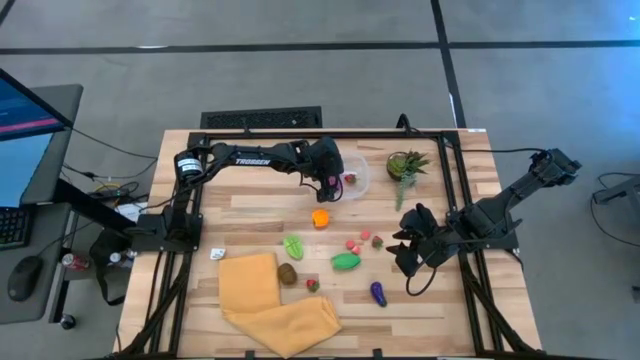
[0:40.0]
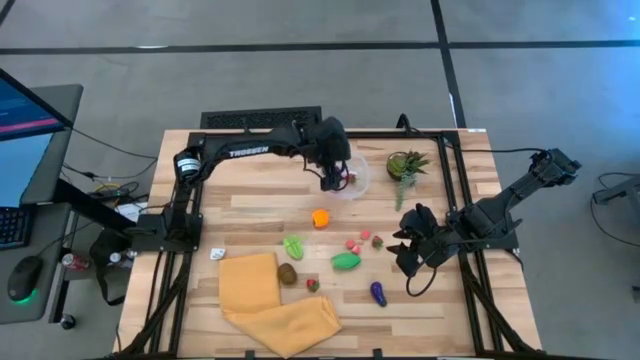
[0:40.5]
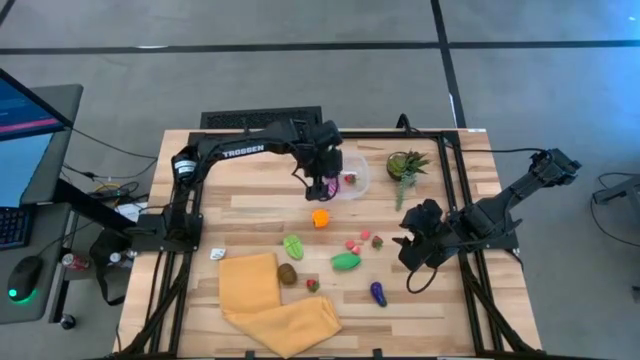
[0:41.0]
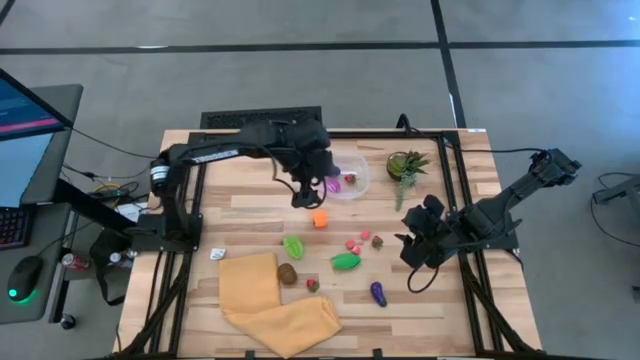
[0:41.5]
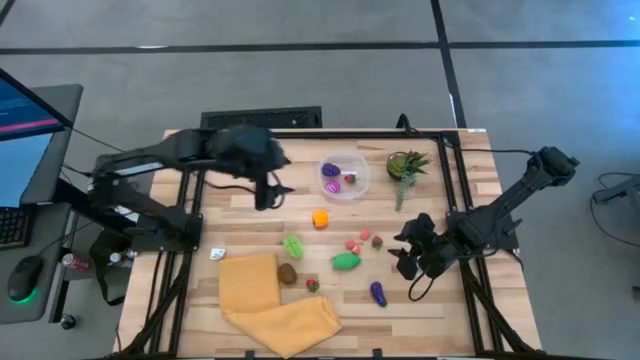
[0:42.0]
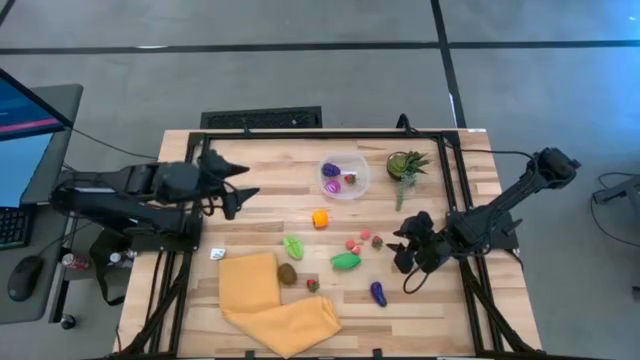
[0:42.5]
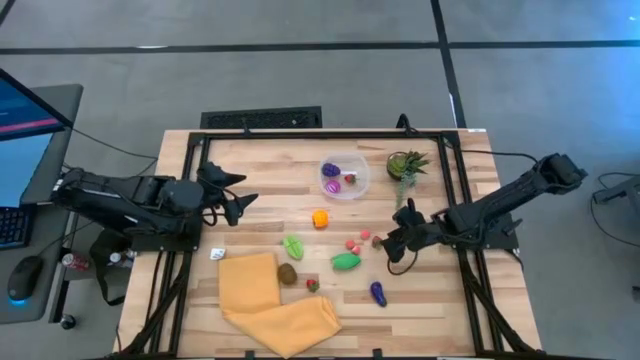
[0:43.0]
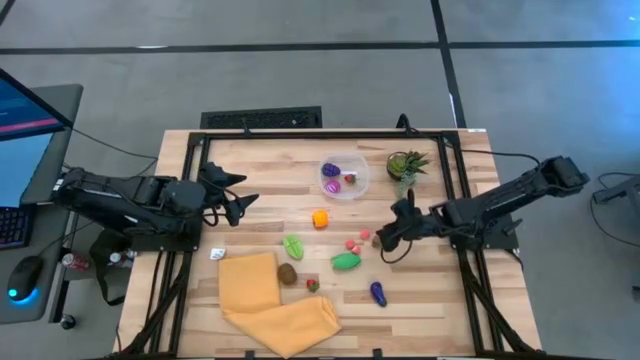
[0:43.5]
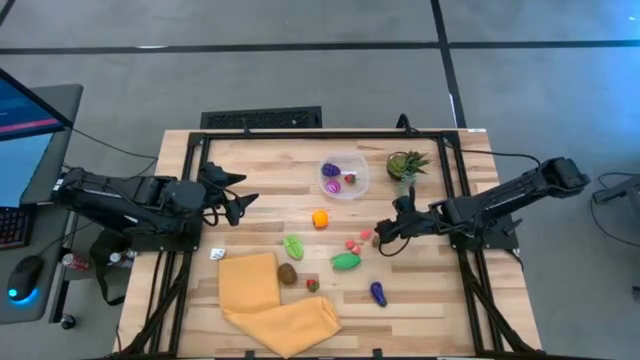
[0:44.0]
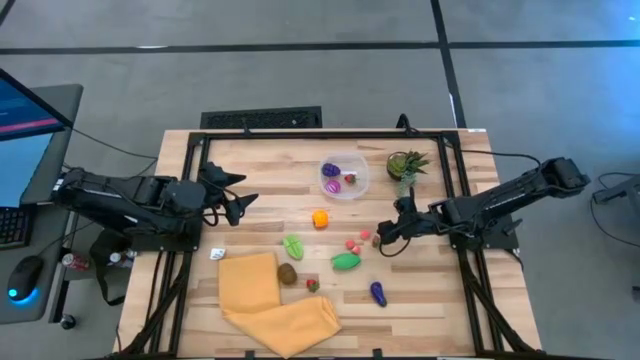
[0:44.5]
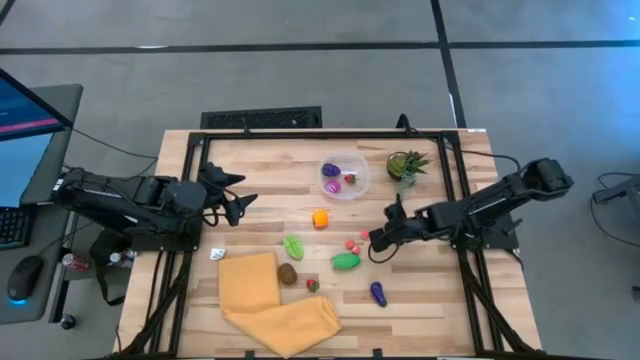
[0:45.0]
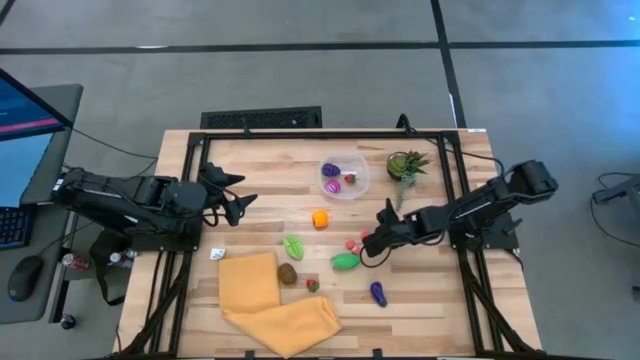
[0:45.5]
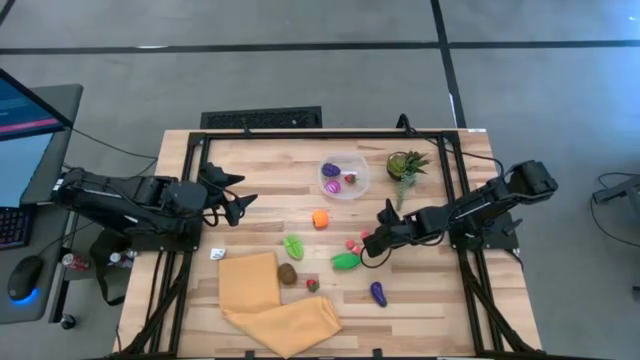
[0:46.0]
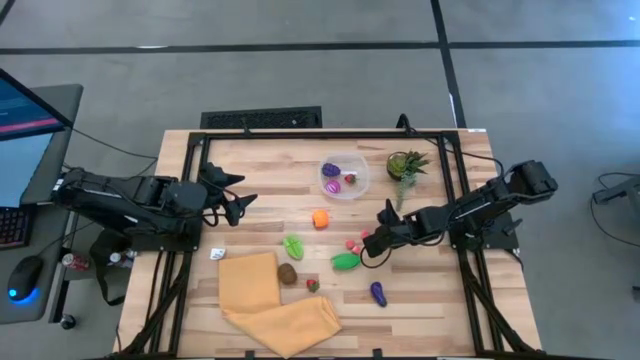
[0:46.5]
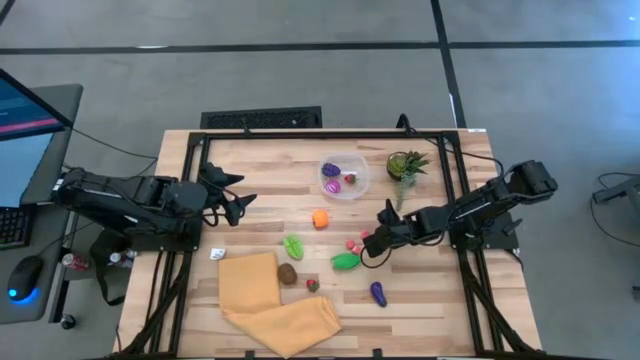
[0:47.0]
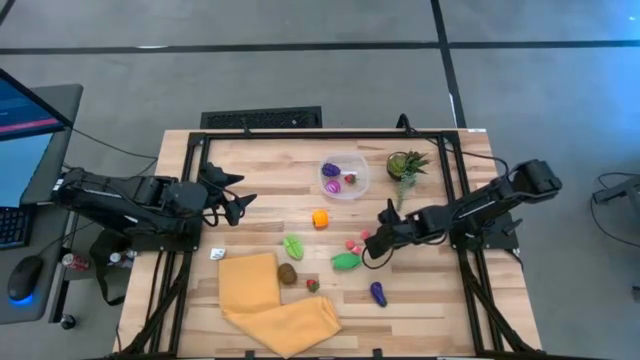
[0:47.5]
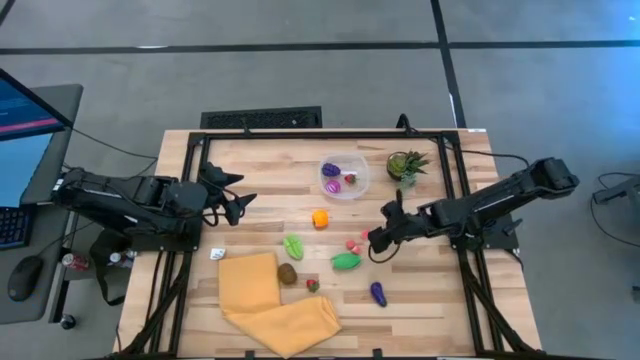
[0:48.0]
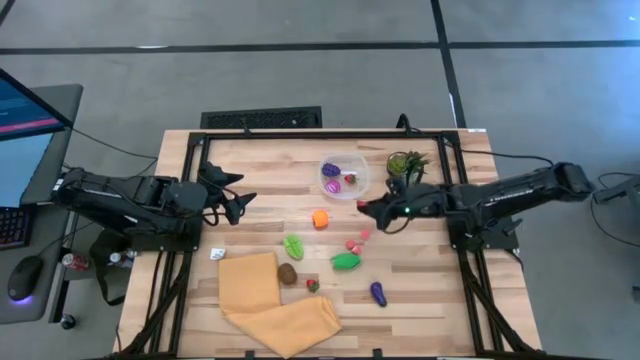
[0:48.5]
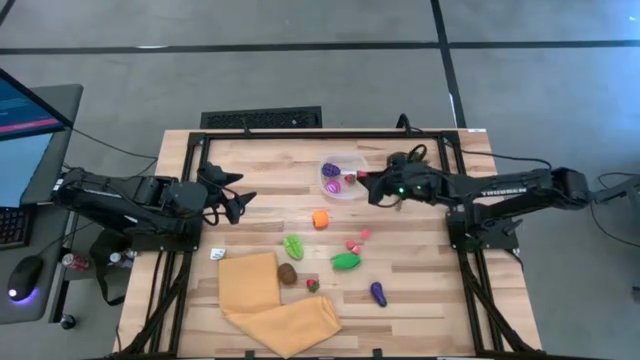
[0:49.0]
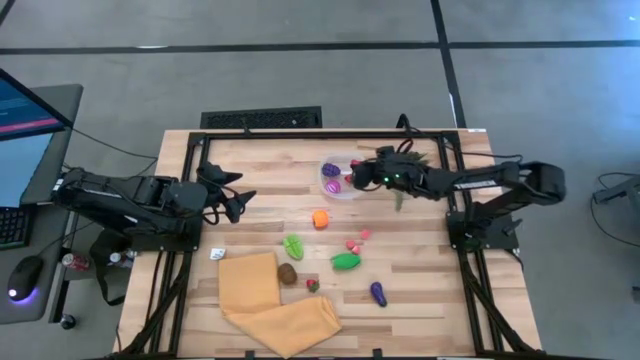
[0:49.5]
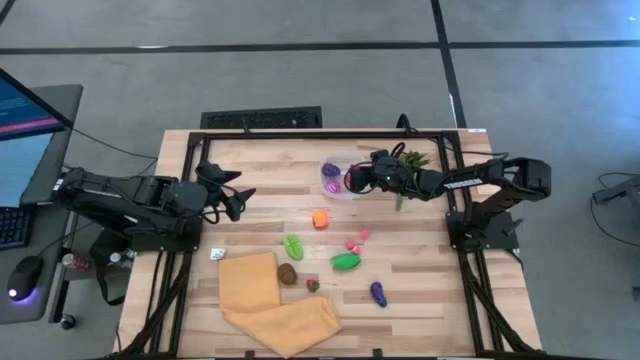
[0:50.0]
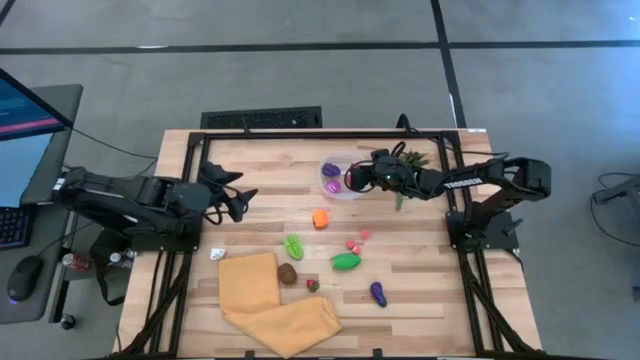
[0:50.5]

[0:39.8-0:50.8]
Task: Pick and placing Produce into tupperware
Put the top strawberry in the transparent bin

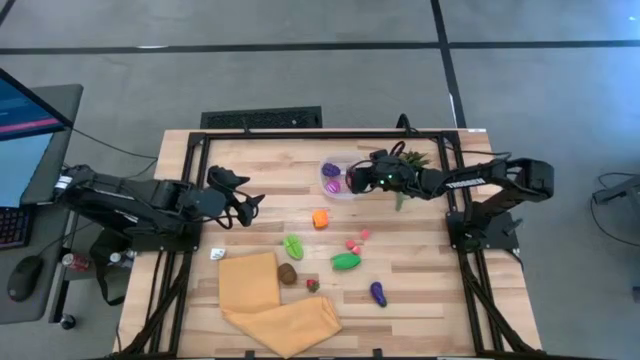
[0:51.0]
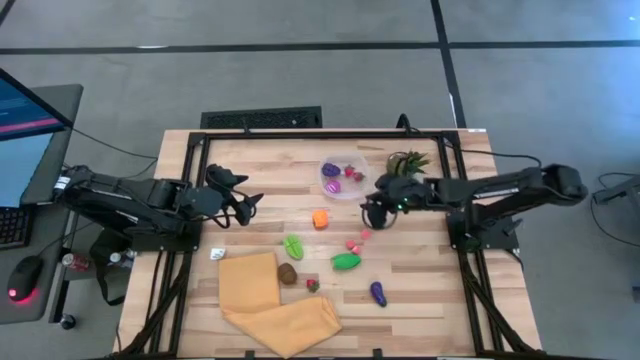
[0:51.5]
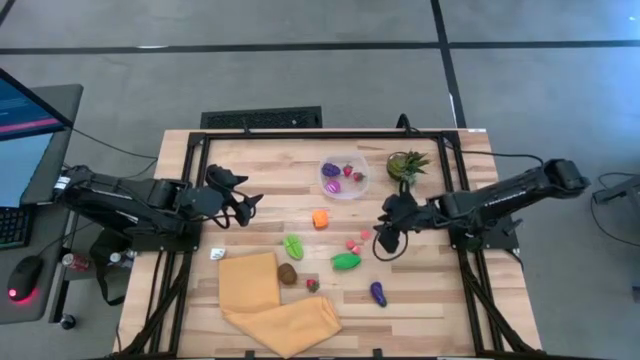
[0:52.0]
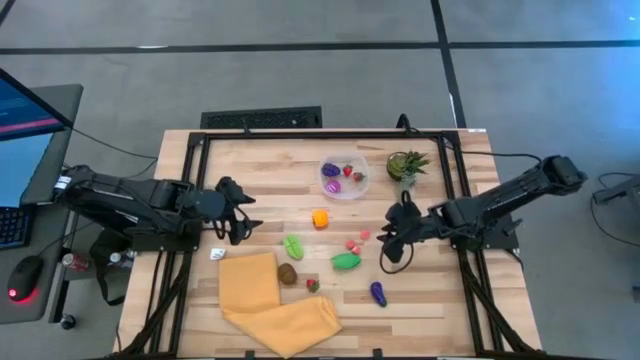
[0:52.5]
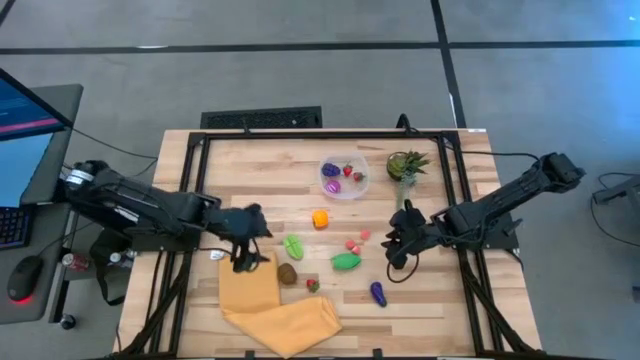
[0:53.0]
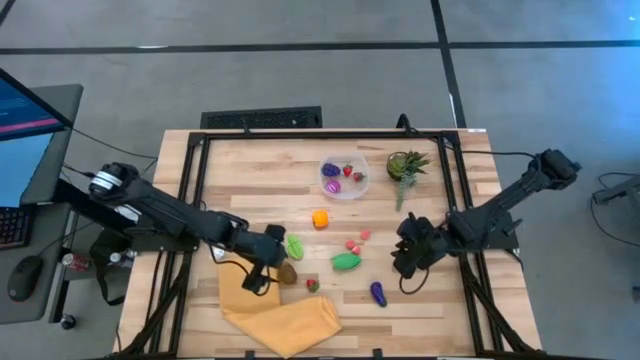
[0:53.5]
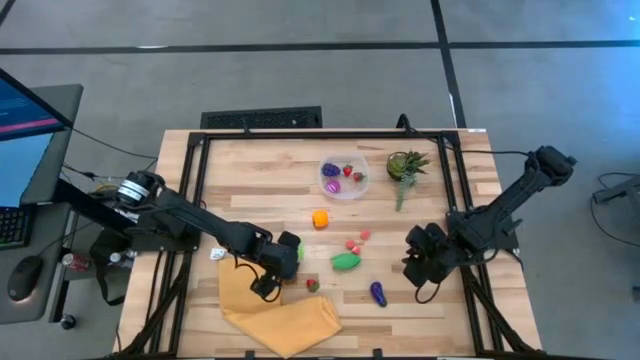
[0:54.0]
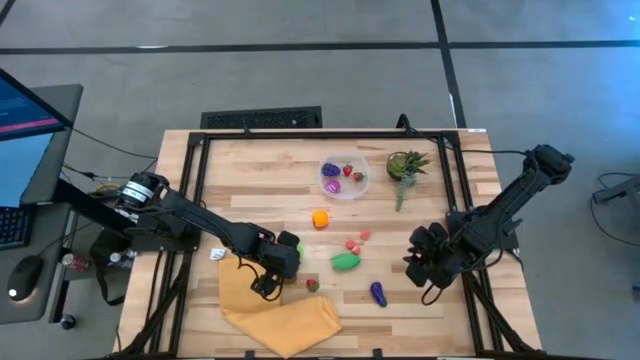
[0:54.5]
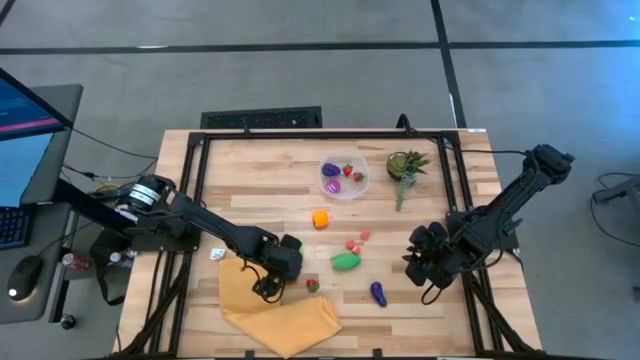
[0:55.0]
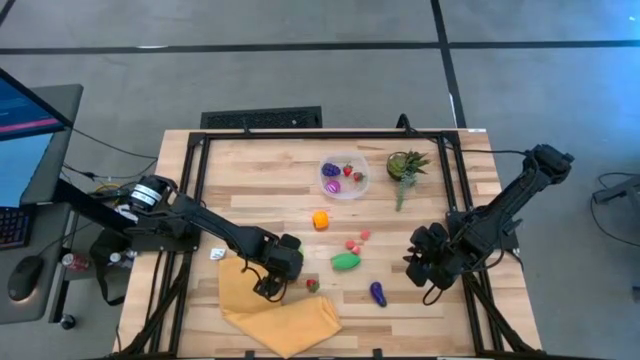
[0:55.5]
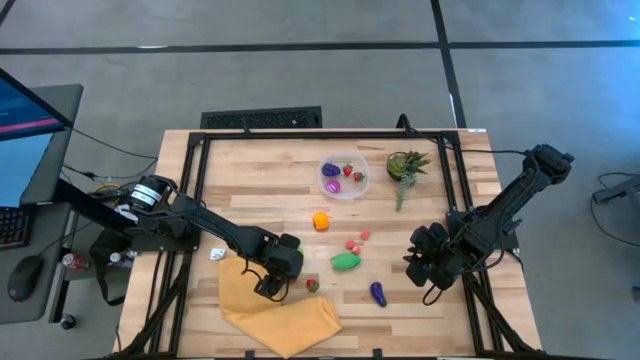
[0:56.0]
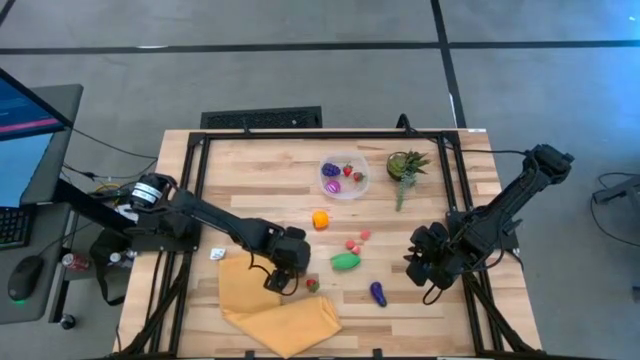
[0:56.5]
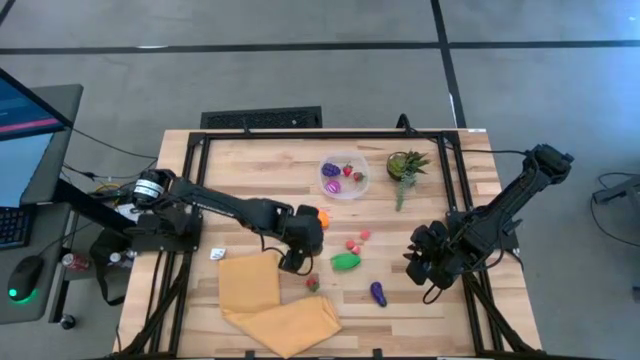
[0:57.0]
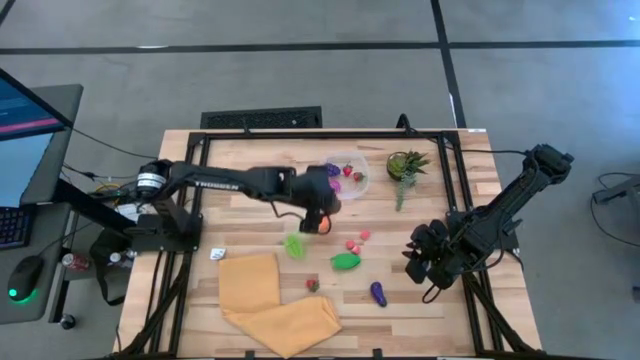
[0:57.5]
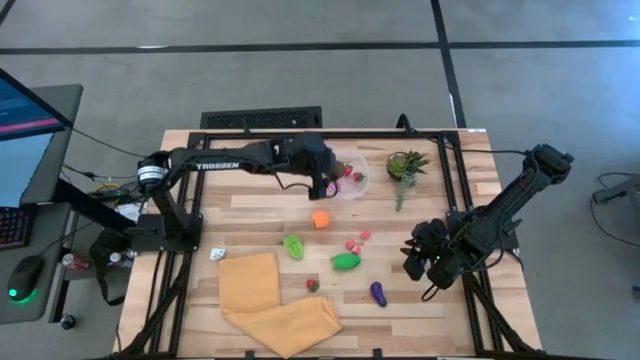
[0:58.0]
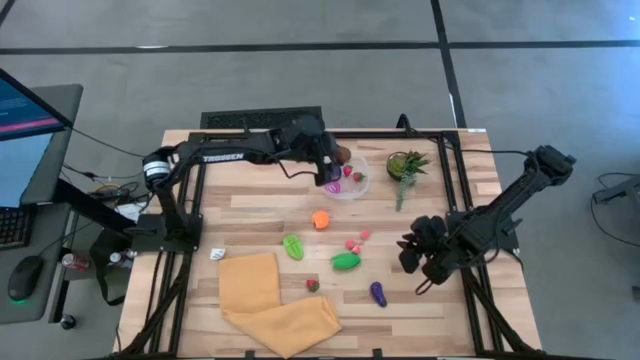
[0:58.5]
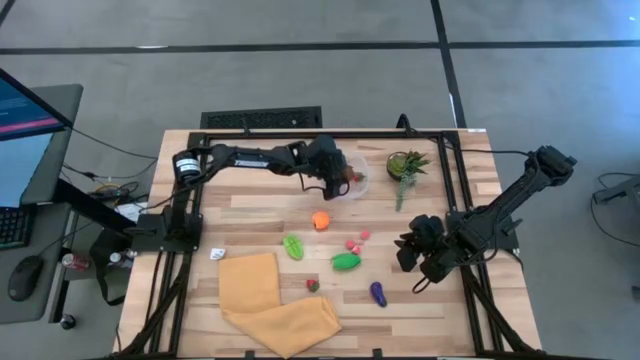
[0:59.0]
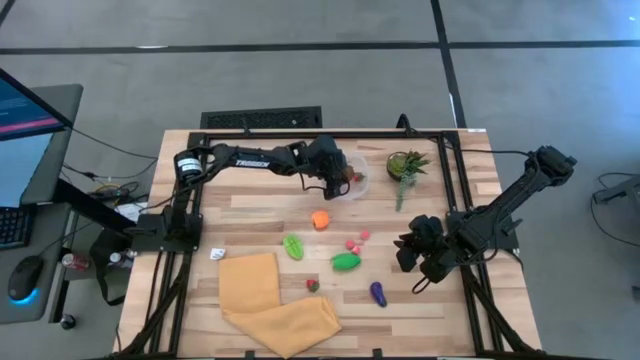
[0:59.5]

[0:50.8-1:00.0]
Put the kiwi in the transparent bin

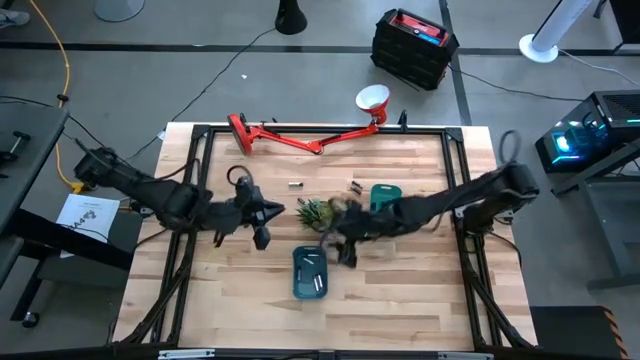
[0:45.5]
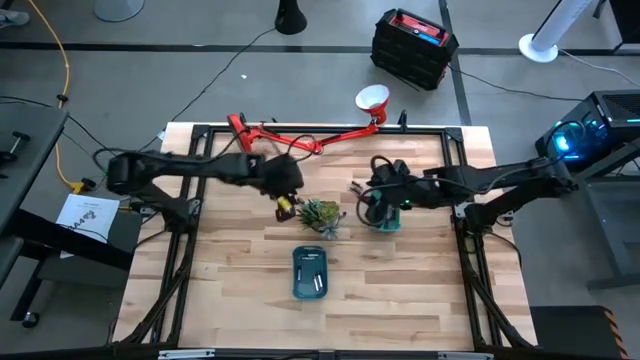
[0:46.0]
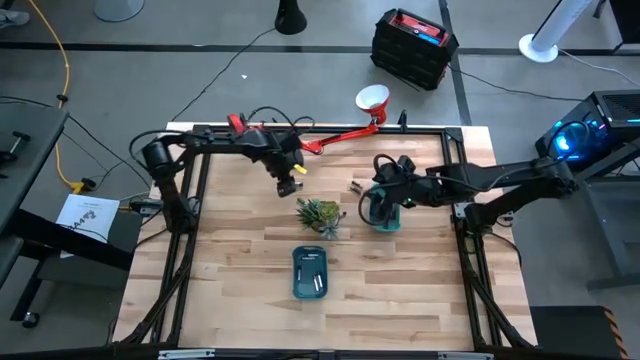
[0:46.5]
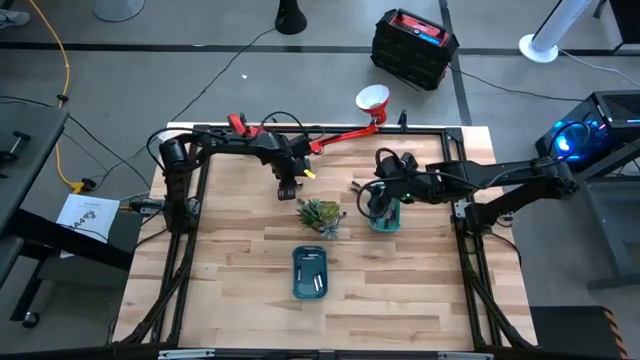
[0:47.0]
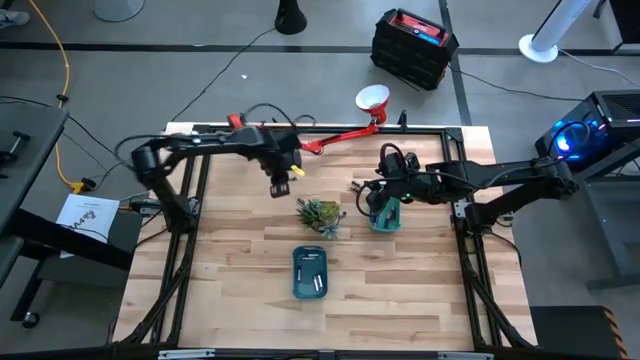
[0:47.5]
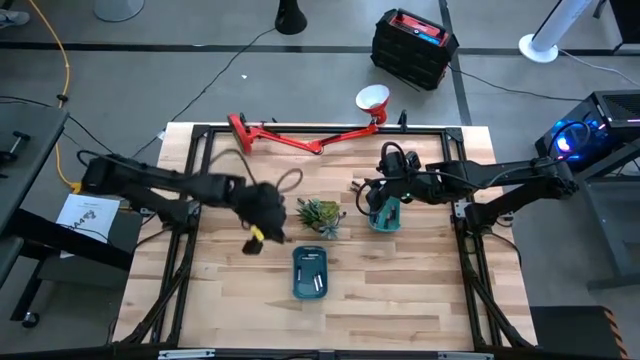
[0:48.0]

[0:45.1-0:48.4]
Task: Sort batteries
Put the silver battery into the blue bin
